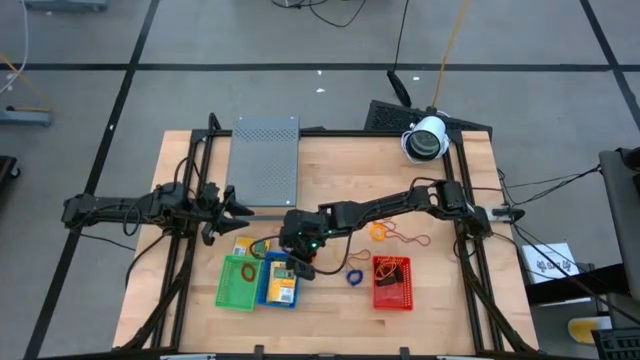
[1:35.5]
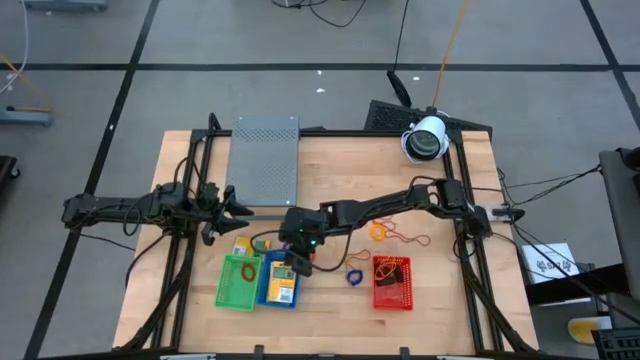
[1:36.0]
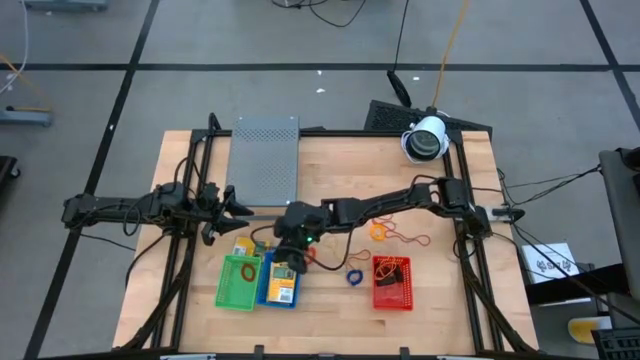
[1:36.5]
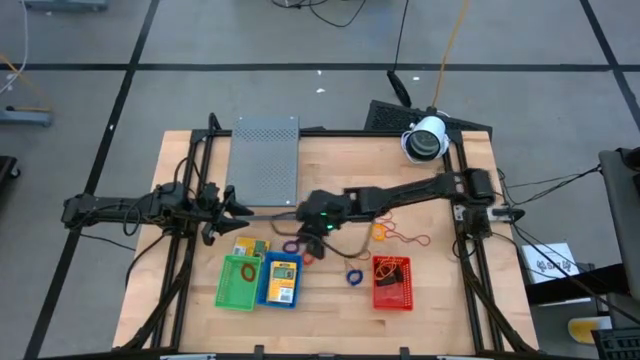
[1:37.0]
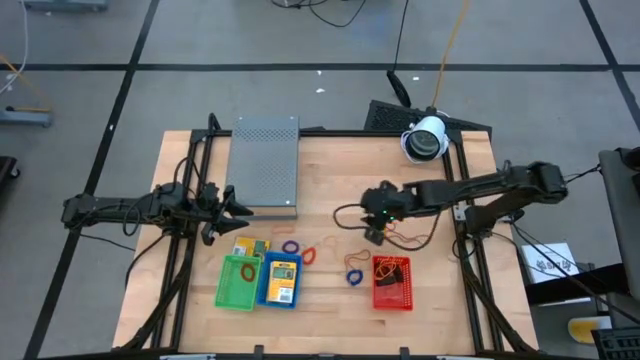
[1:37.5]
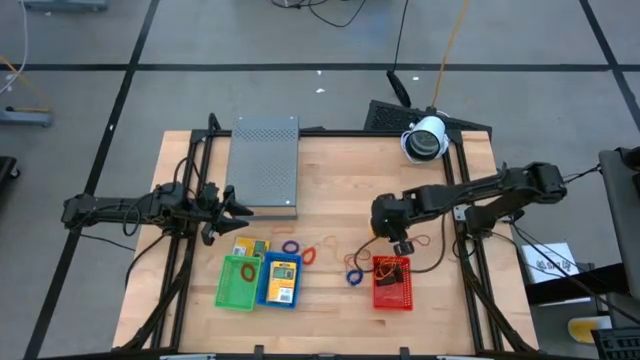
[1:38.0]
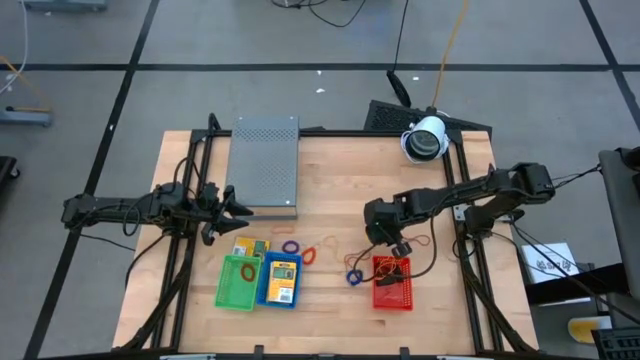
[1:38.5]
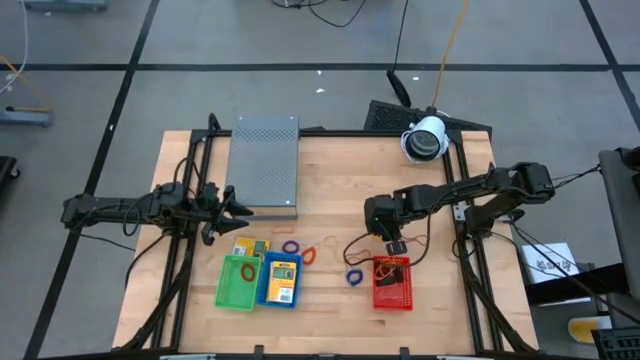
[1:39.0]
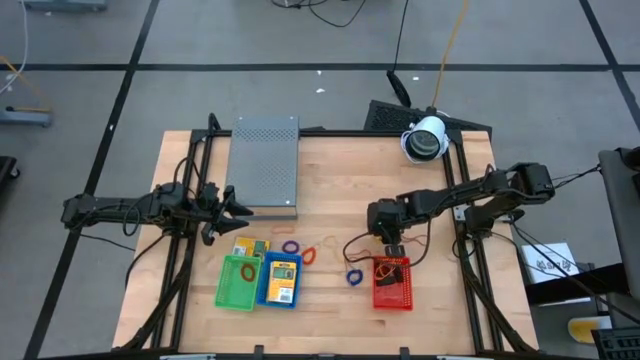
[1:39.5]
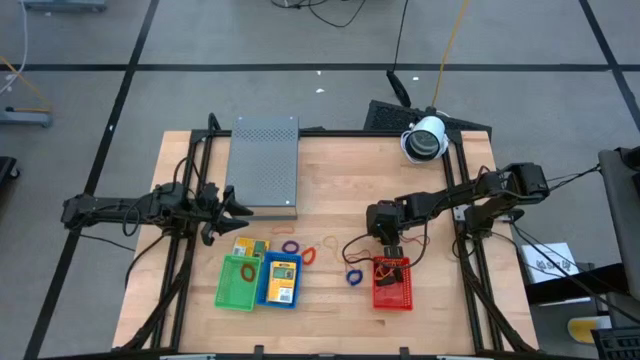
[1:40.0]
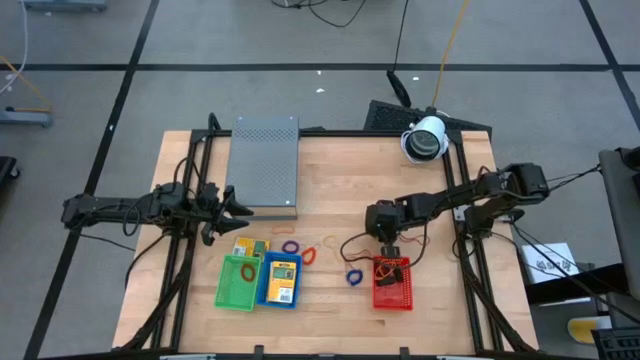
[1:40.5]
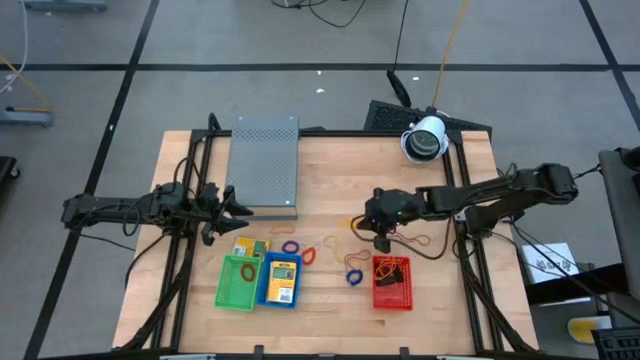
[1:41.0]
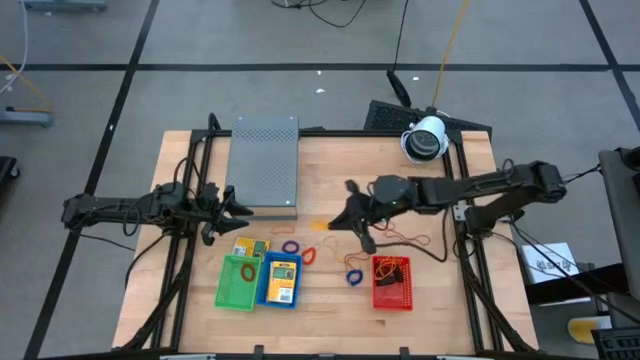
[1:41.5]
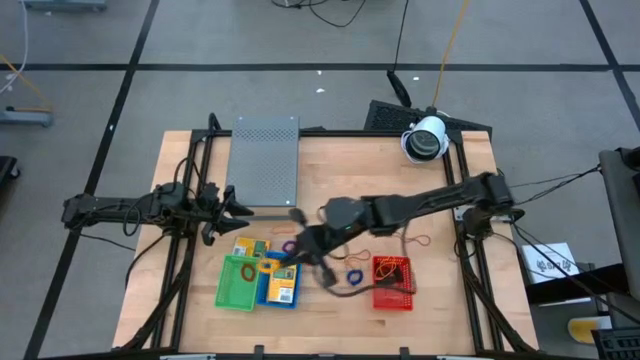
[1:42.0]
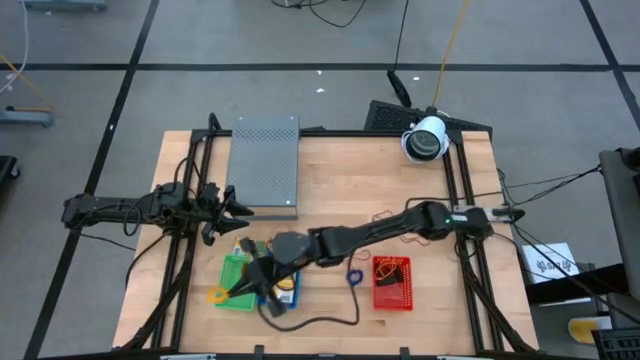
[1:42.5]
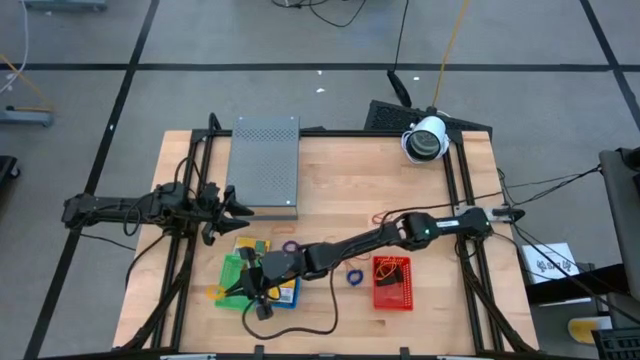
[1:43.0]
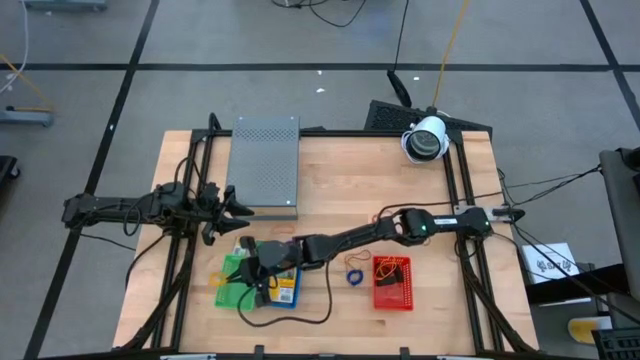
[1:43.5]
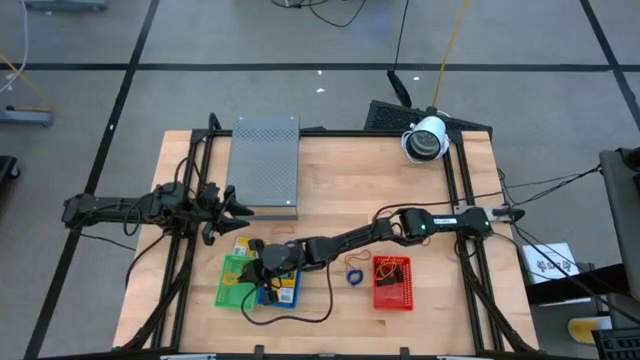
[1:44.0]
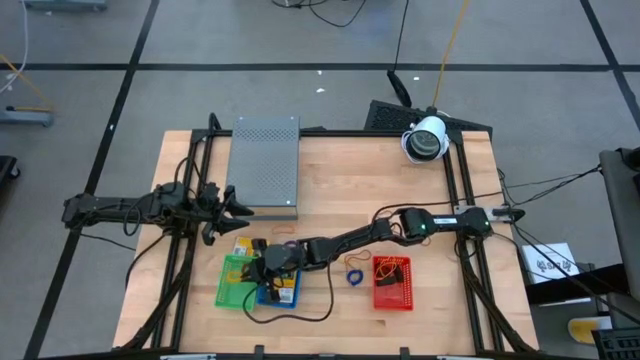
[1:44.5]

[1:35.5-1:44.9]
Task: Pick & Place Office Desk Supplies
Put the yellow spring rubberband into the green bin

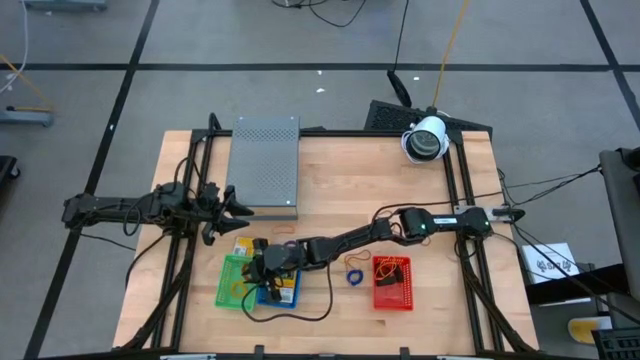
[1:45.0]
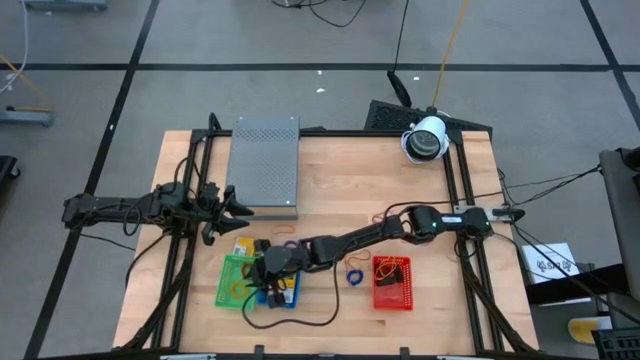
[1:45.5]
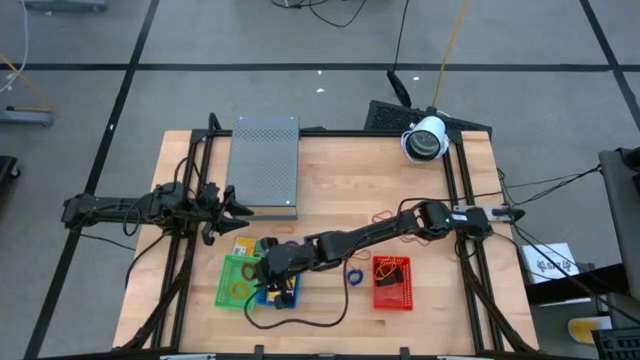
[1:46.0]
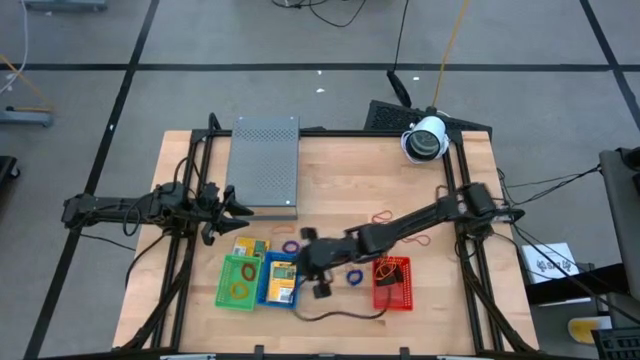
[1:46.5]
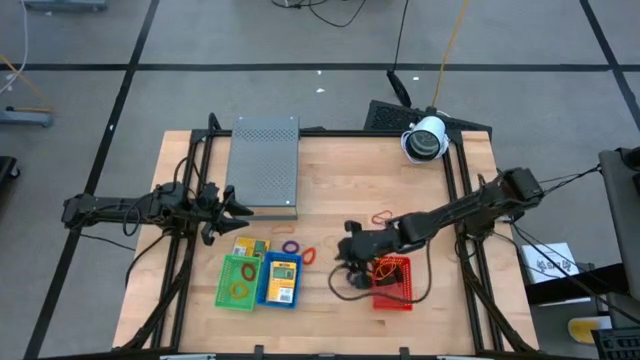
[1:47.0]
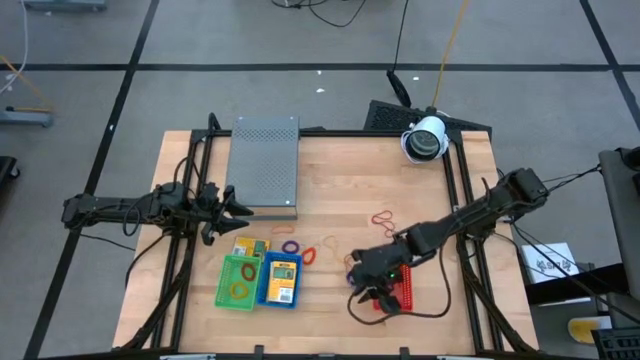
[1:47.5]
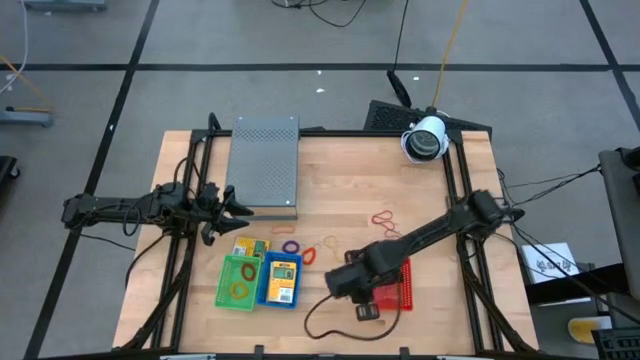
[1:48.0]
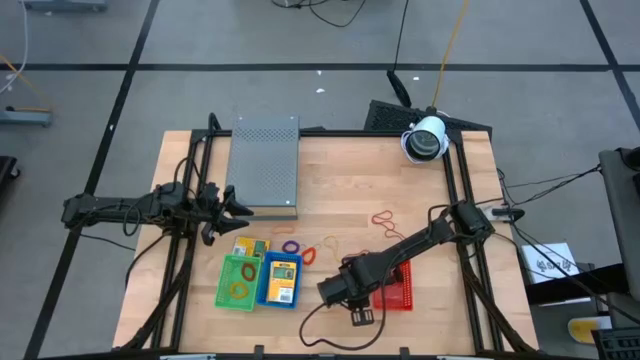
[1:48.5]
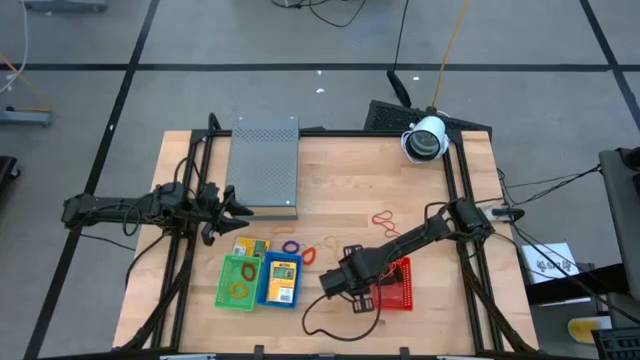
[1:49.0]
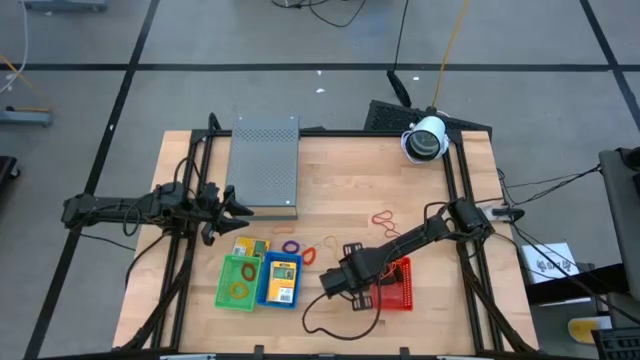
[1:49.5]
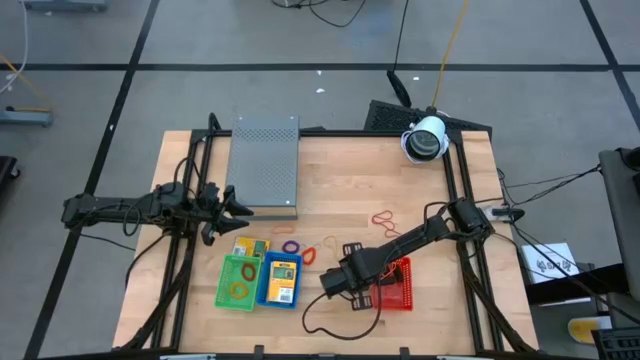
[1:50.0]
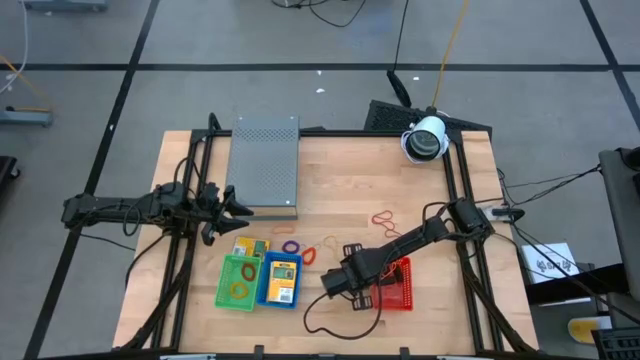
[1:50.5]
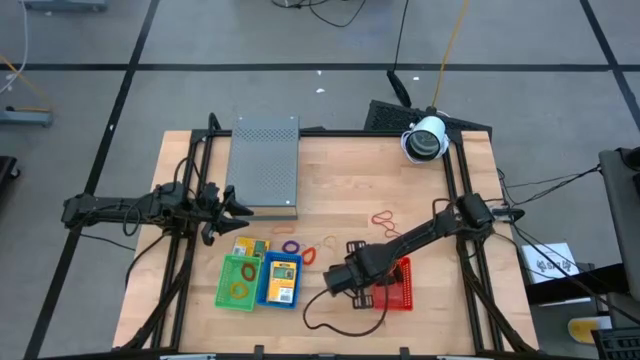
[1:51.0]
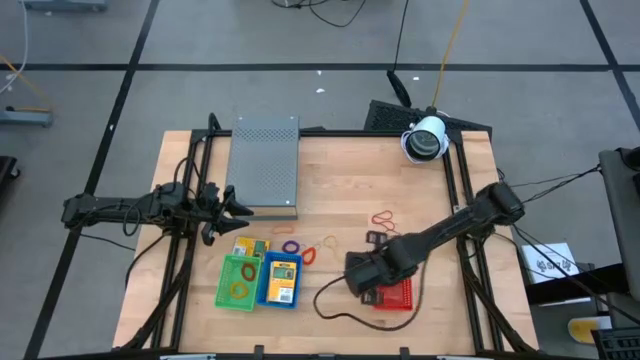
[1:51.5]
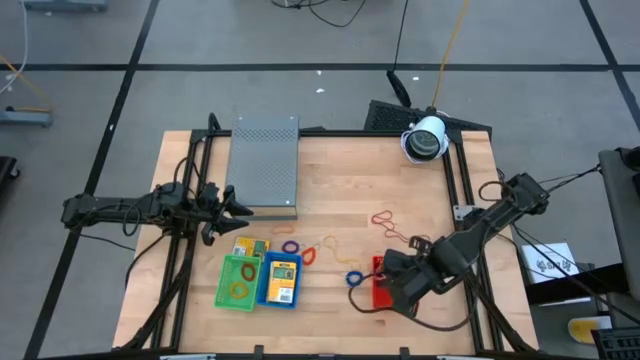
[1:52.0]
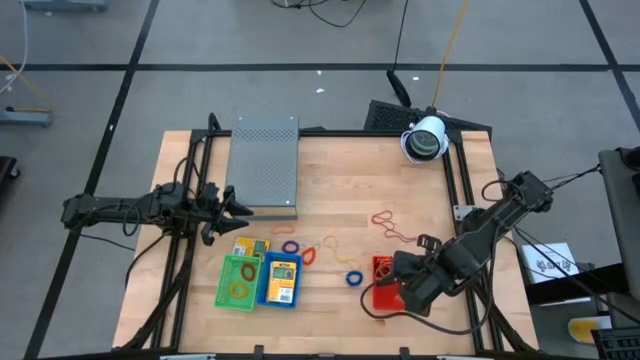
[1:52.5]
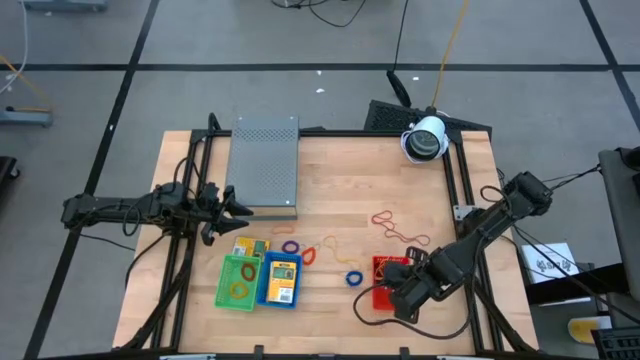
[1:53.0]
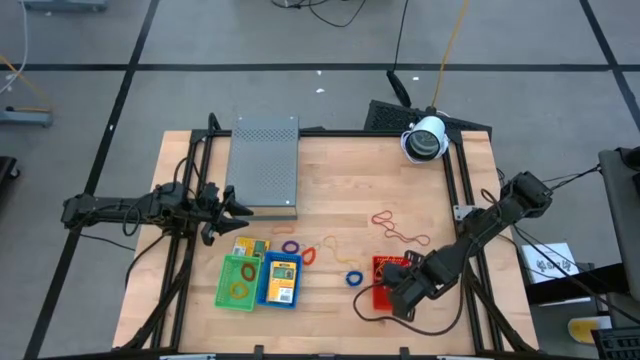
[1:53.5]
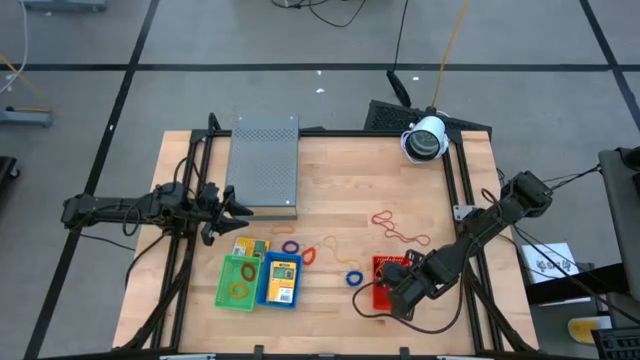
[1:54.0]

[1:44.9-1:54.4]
Put the red rubber band into the red bin

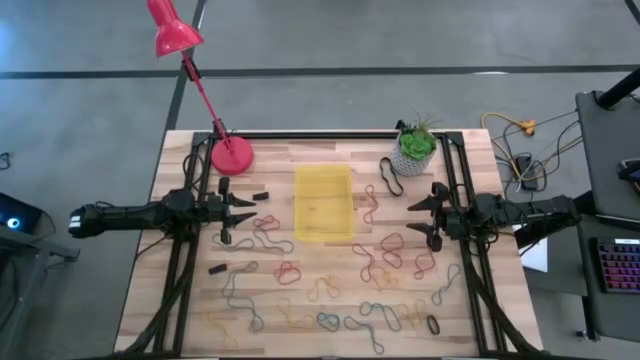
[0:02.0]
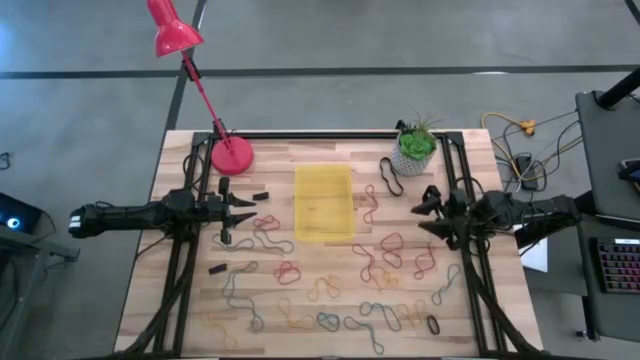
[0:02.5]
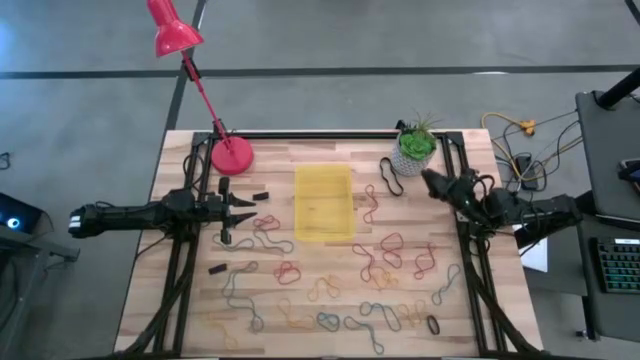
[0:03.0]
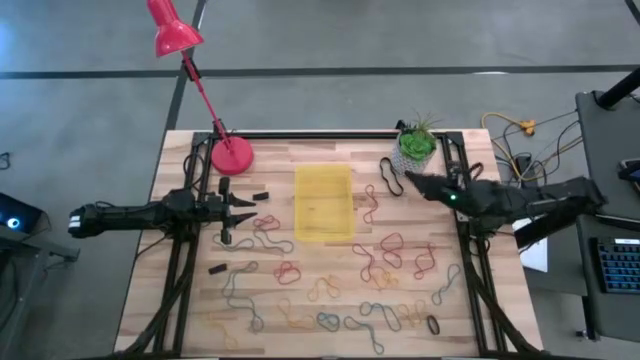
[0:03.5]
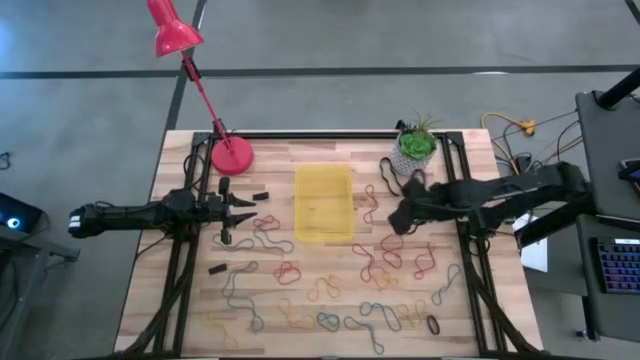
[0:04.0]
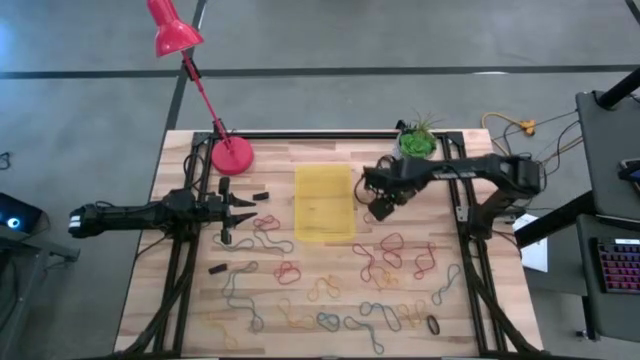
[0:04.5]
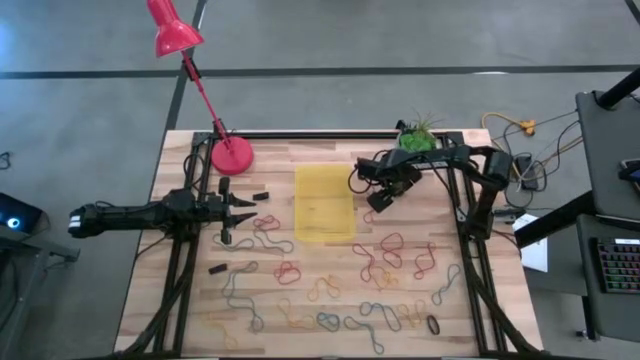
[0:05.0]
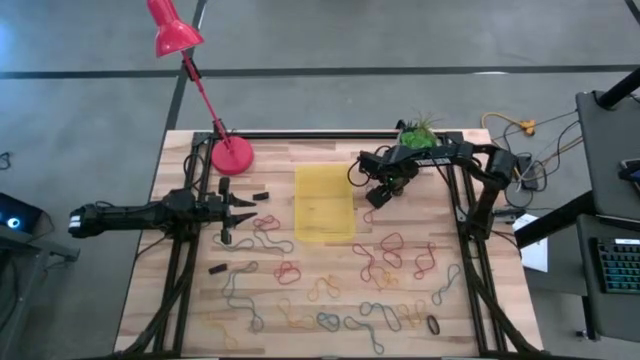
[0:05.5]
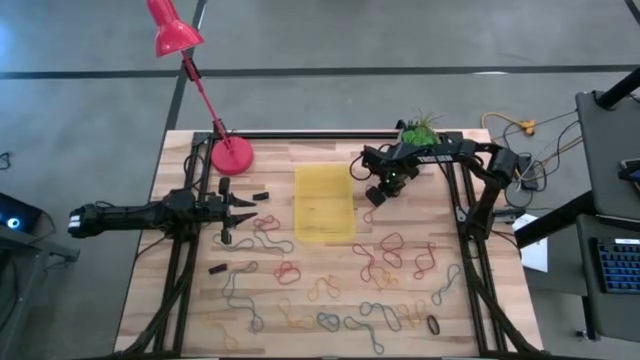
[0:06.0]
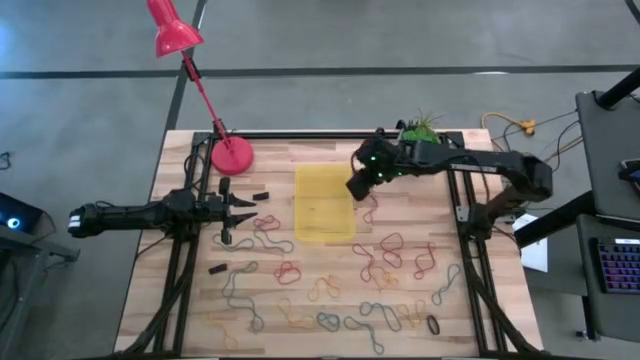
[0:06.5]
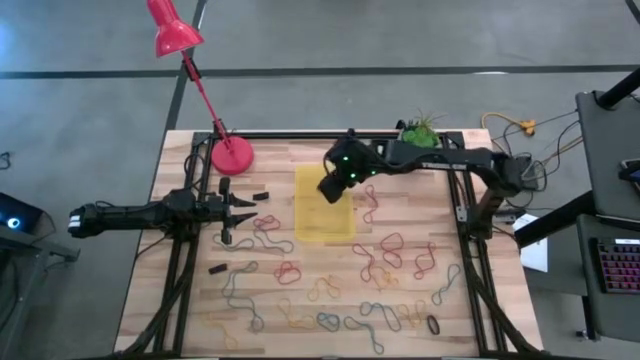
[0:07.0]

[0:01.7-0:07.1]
Task: Pick and place rubber bands into bin
Put the the black rubber band into the yellow bin
